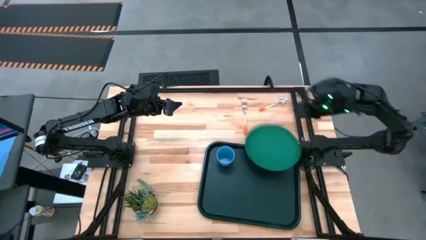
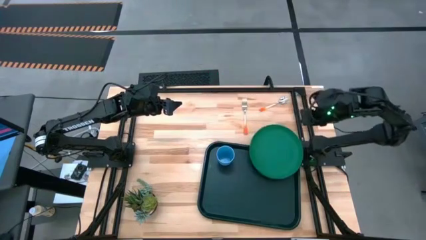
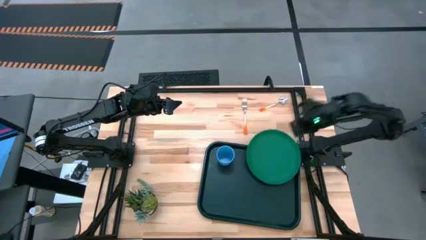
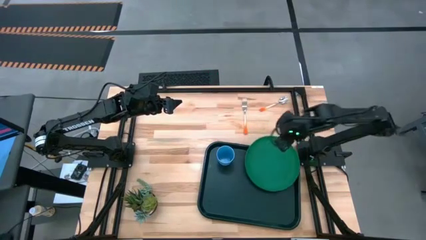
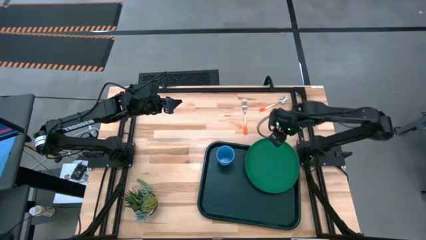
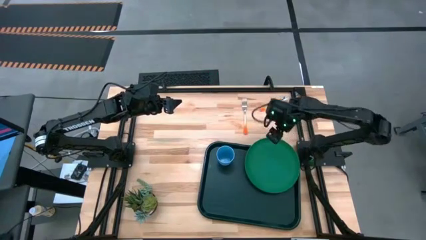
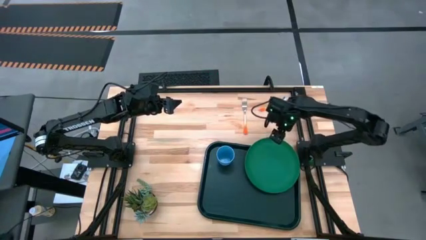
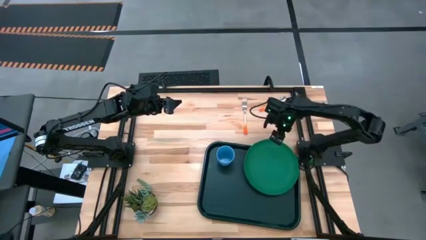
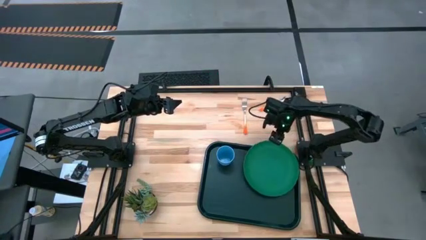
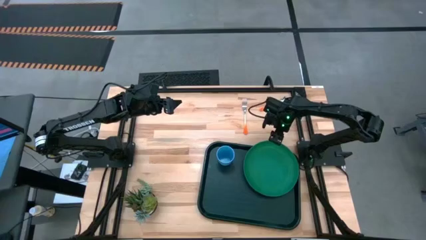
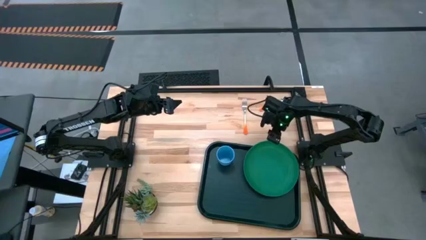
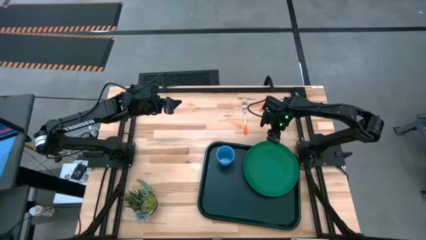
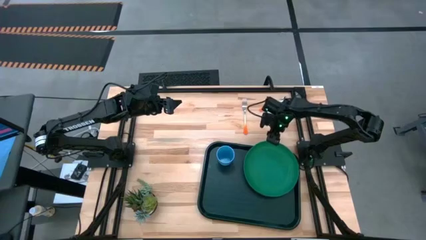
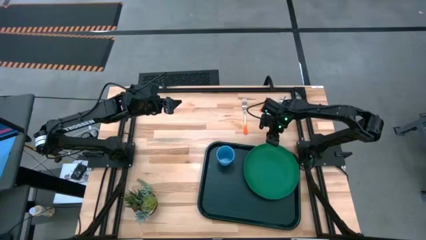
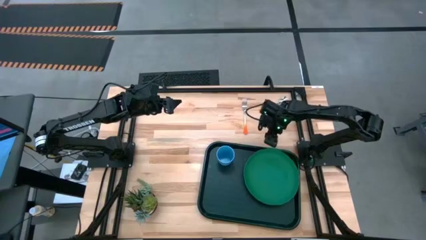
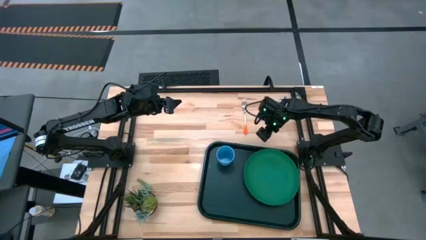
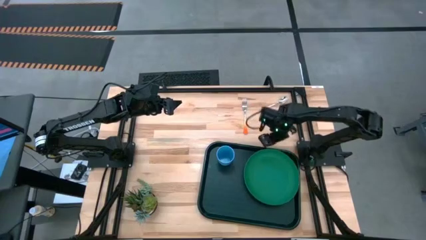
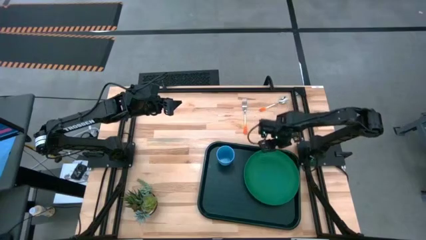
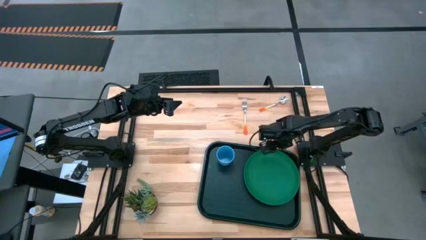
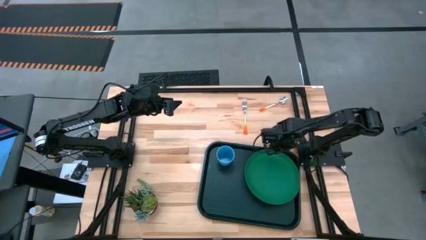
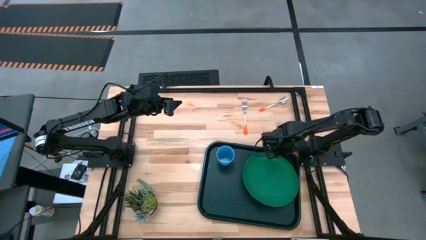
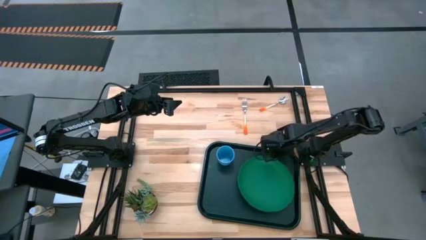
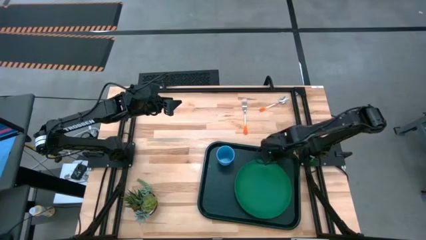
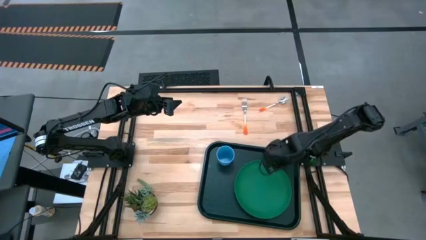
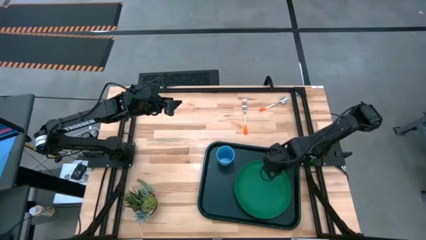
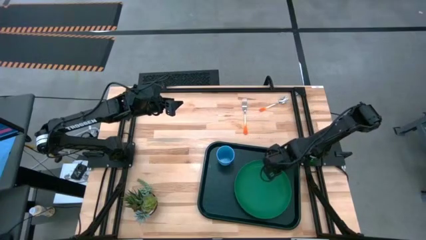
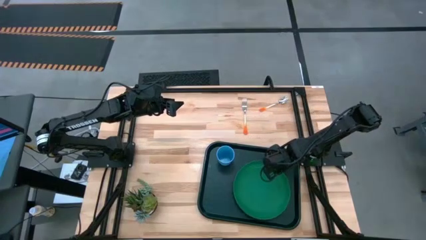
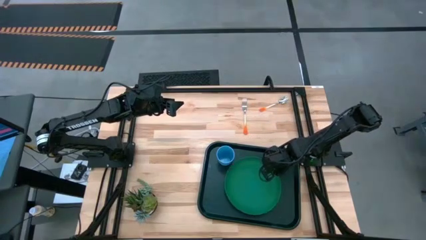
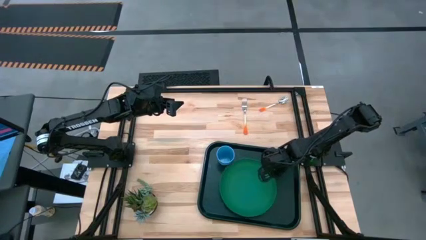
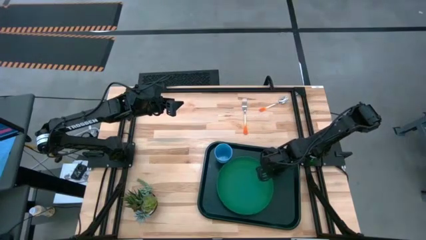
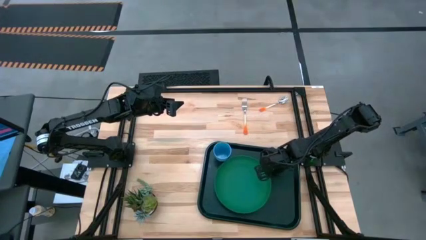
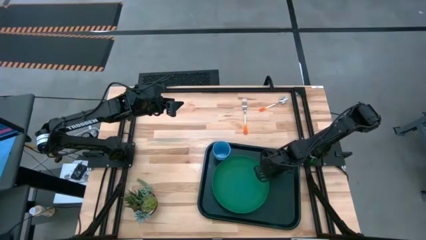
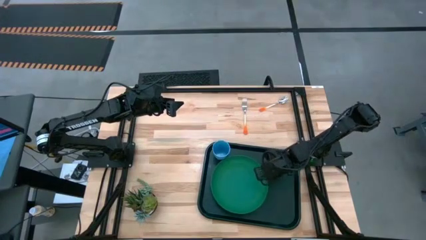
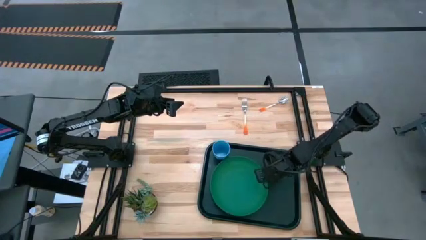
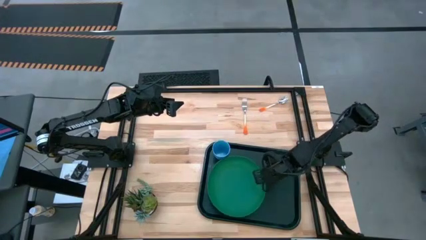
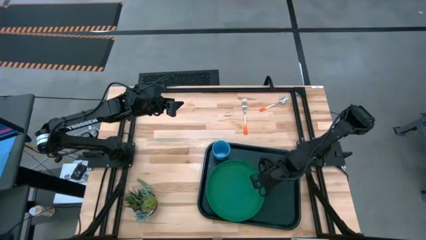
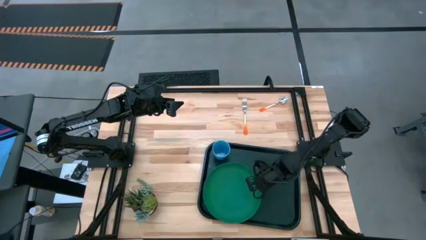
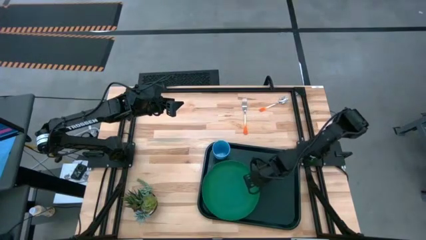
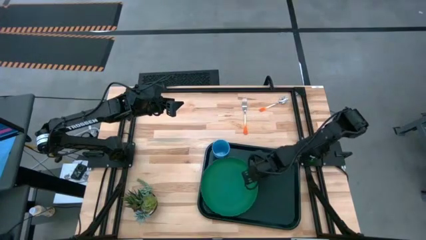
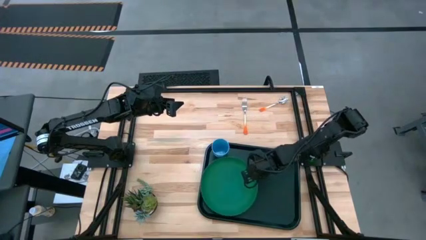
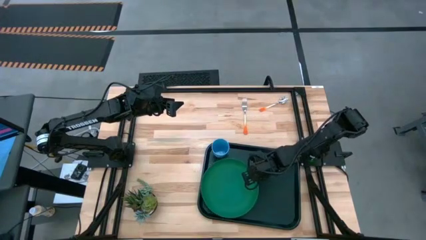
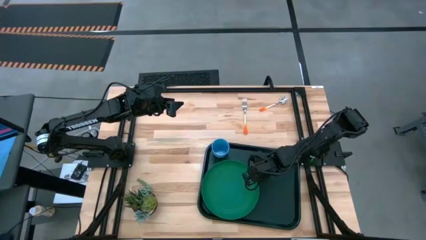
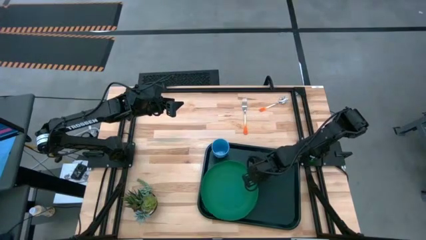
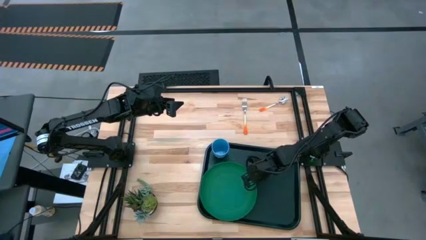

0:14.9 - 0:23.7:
Task: Pick and place plate/cup/fork/spoon on tray
Put the green plate on the black tray

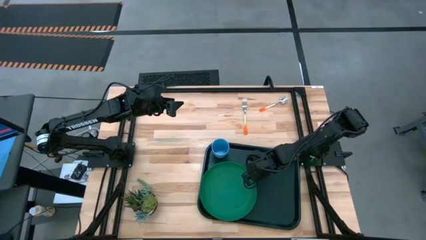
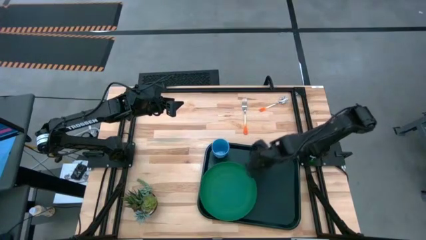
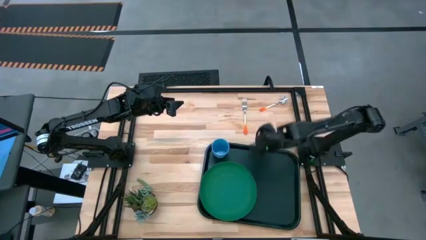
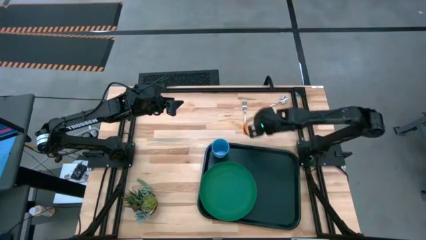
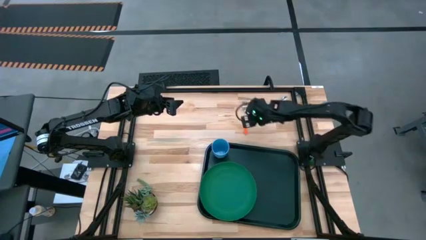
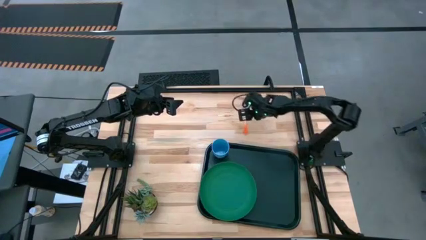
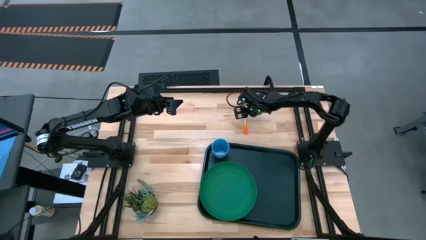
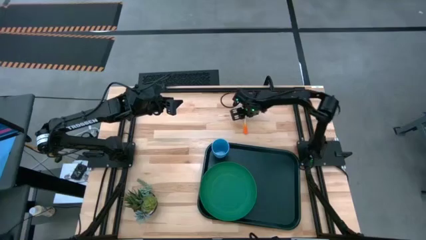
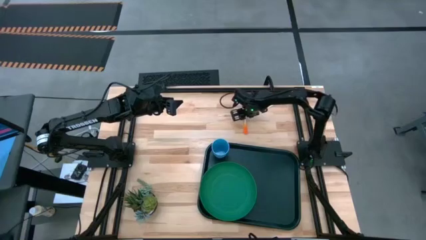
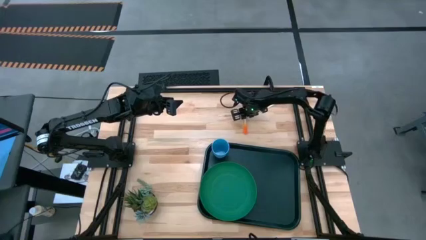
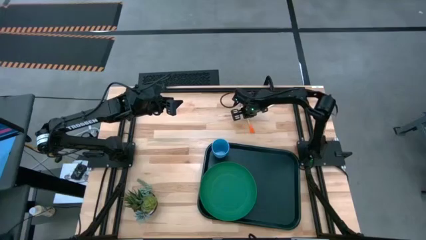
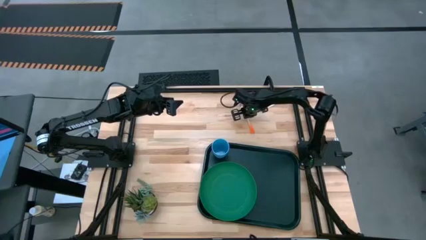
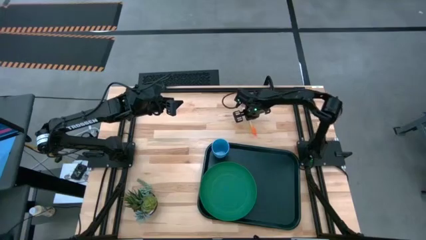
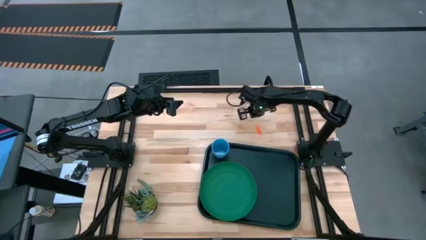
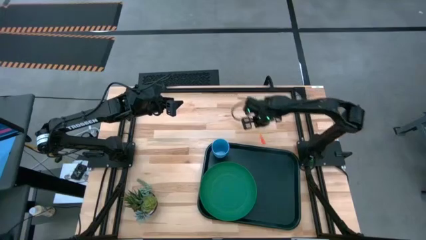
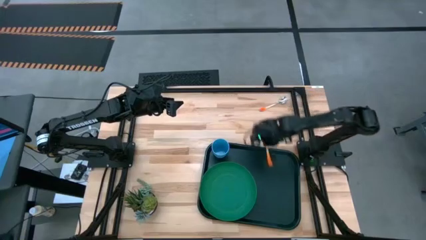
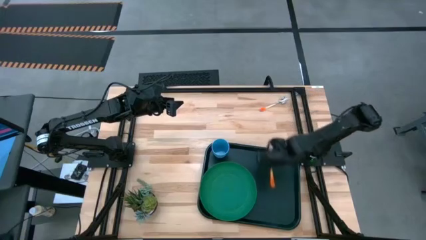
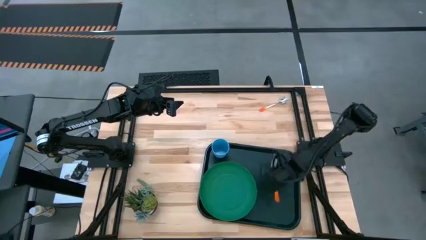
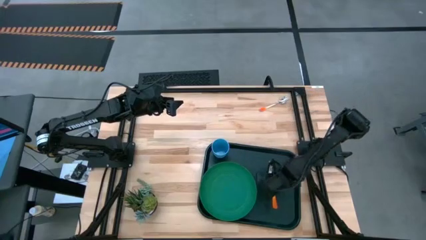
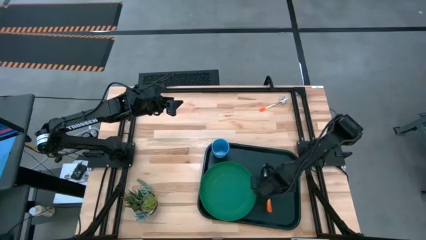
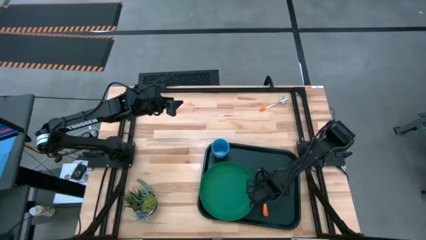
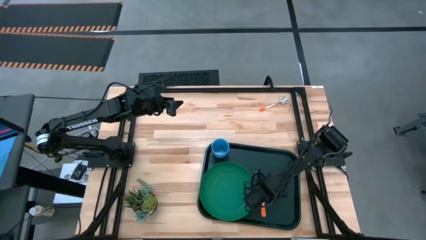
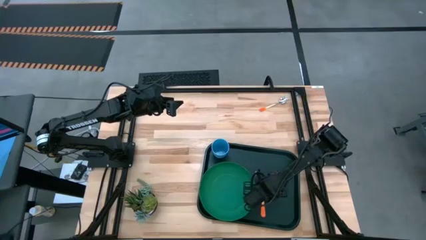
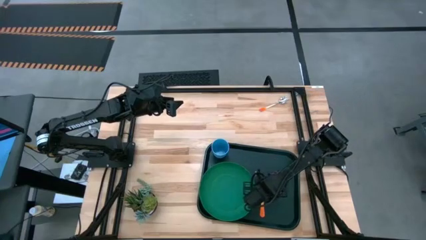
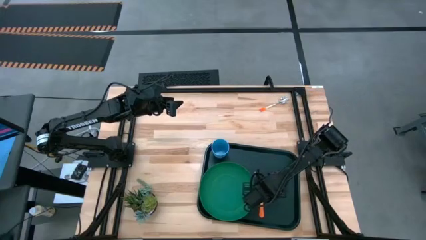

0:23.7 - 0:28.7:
Put the orange fork to the right of the green plate on the black tray

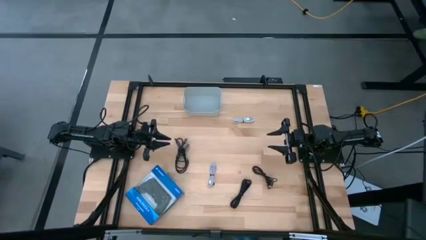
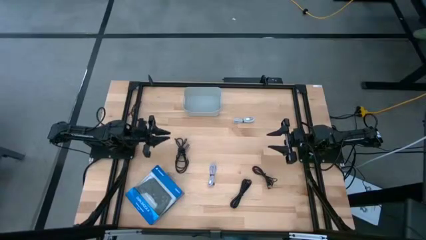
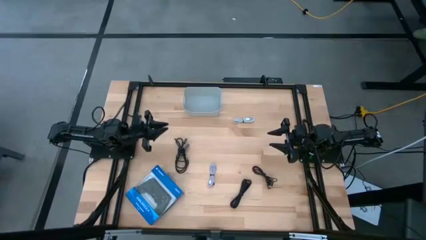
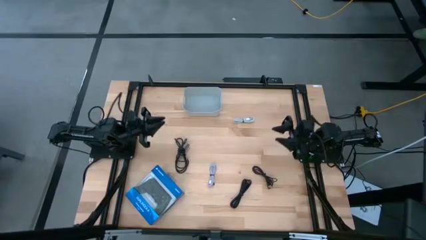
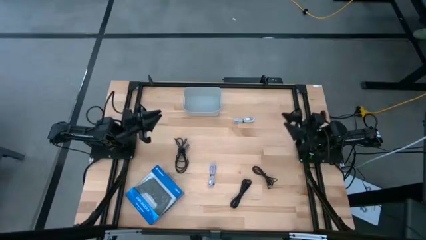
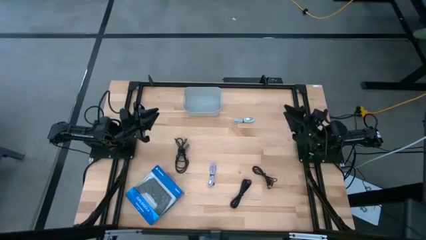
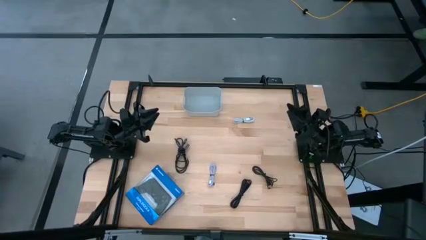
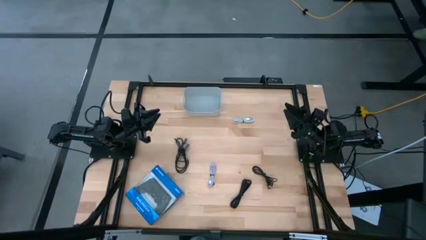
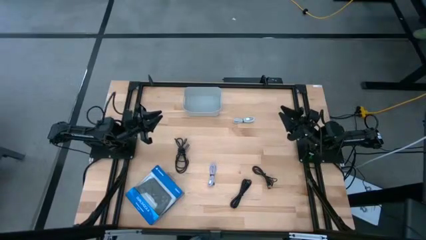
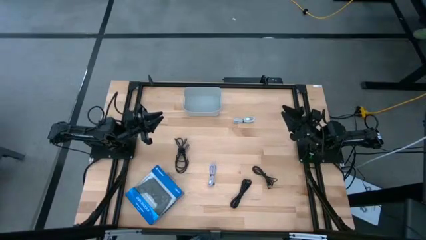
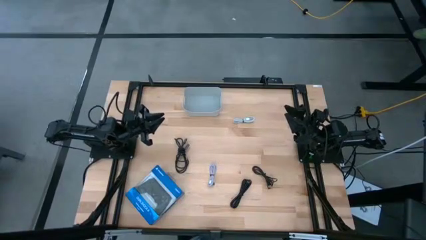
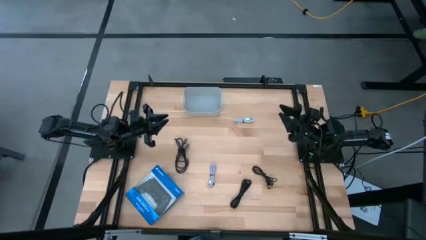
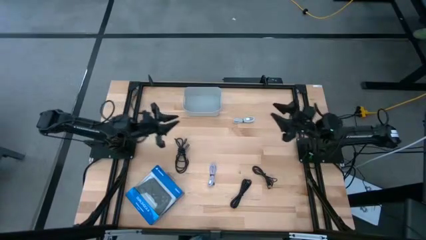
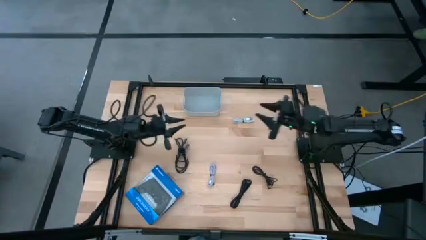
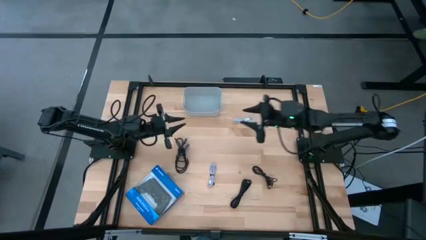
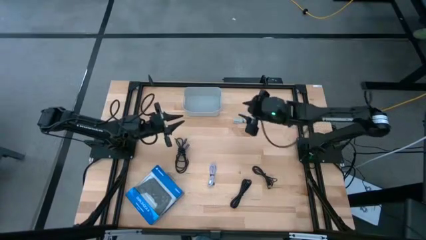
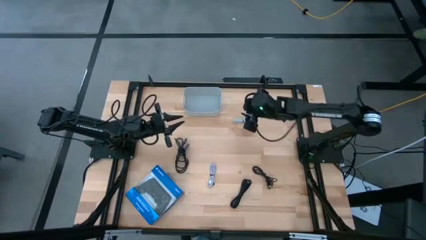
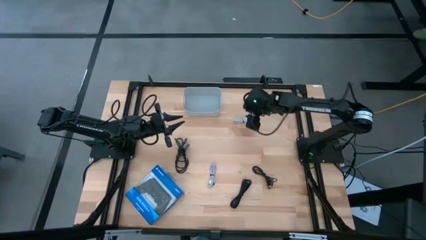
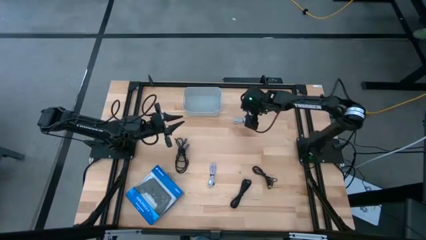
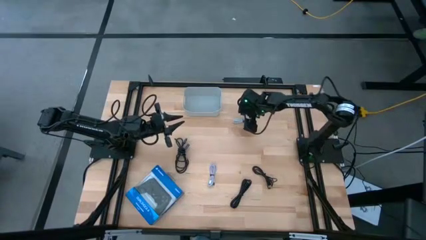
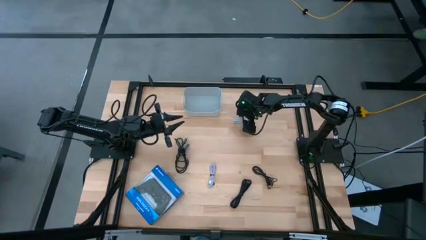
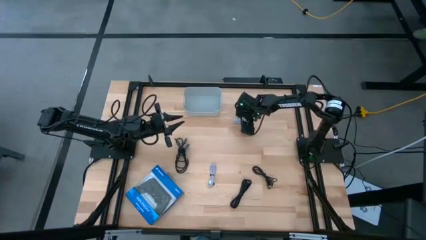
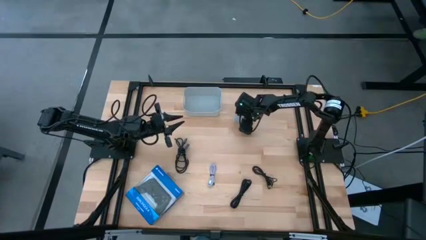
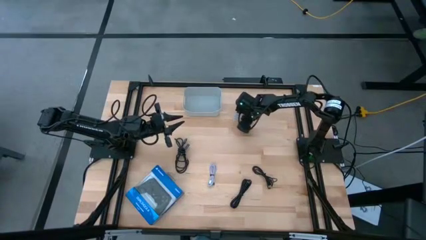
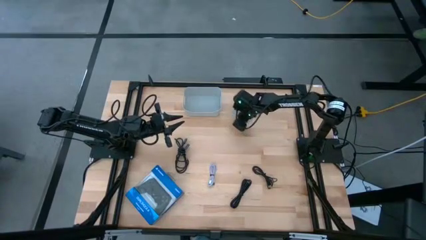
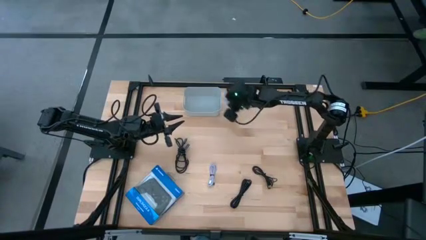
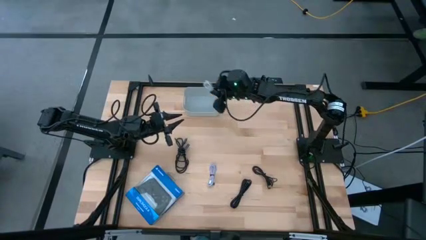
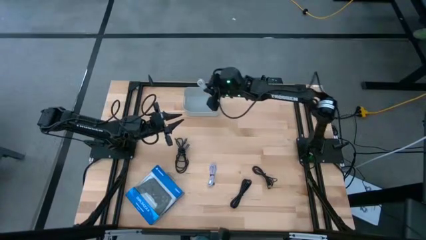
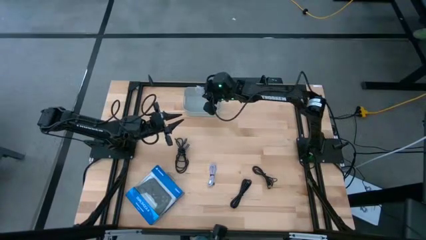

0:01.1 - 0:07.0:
Task: Pick and place USB-C Cables
Put the top white charger cable into the white bin
